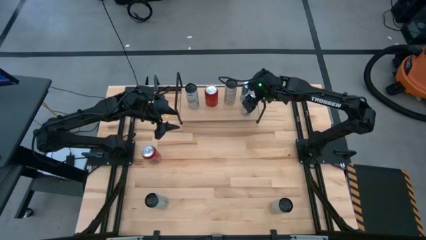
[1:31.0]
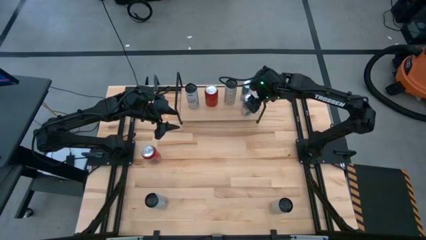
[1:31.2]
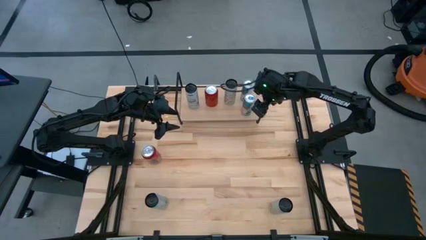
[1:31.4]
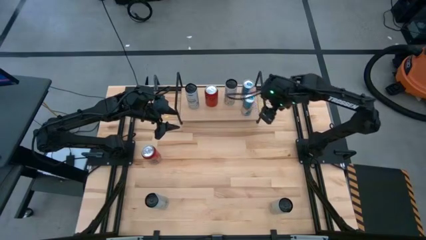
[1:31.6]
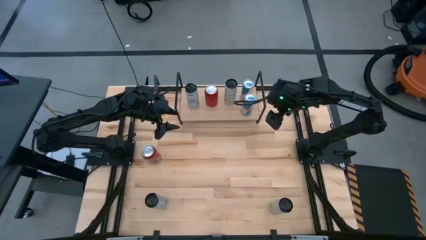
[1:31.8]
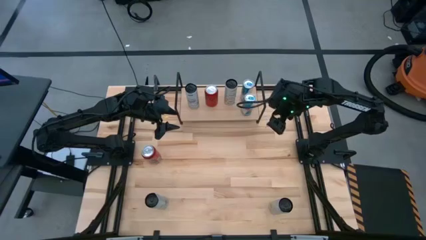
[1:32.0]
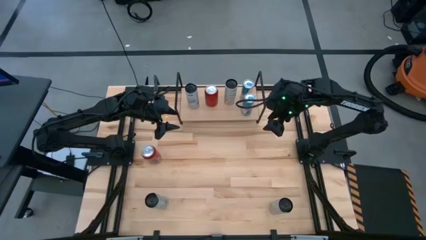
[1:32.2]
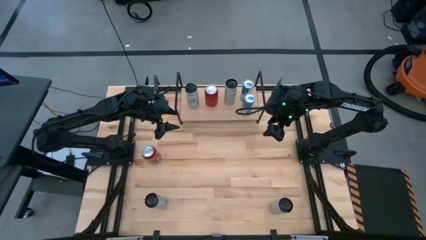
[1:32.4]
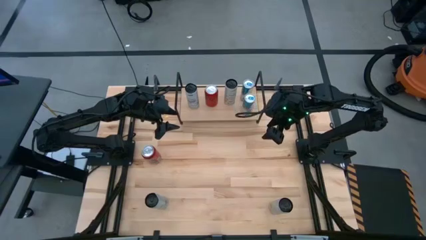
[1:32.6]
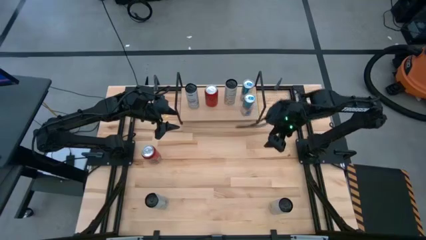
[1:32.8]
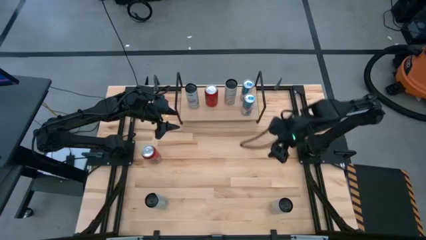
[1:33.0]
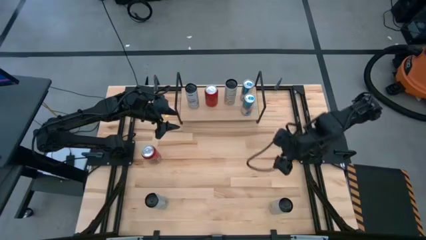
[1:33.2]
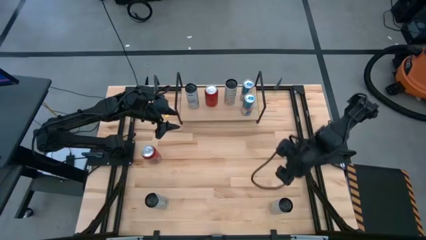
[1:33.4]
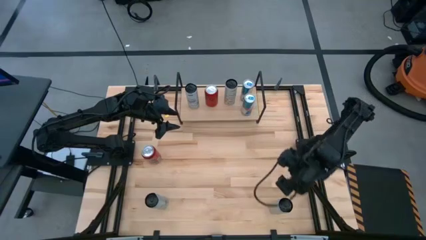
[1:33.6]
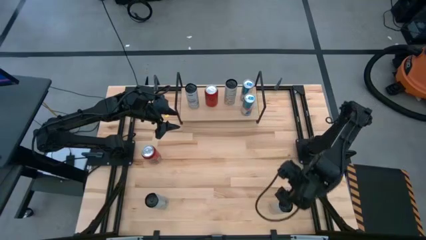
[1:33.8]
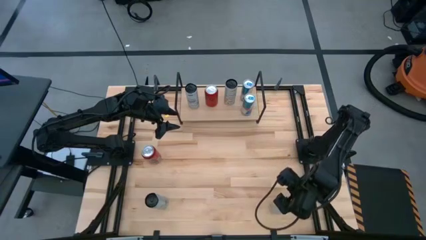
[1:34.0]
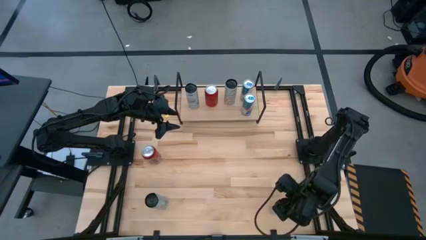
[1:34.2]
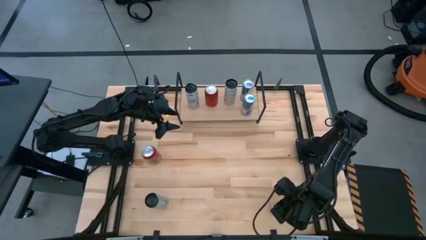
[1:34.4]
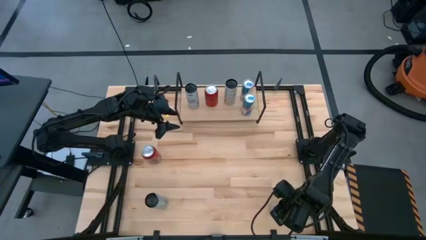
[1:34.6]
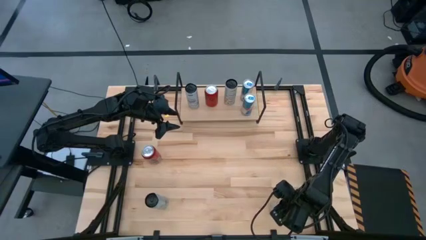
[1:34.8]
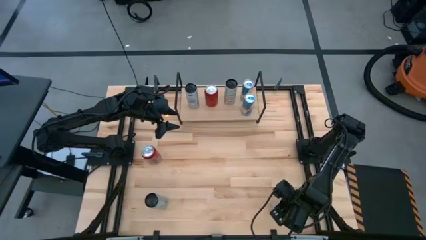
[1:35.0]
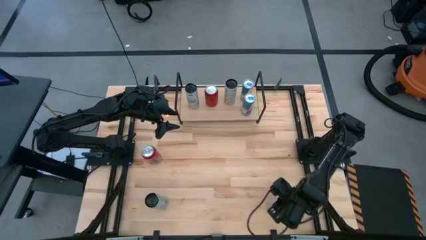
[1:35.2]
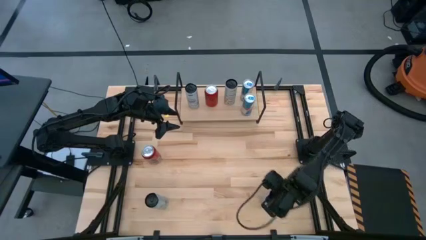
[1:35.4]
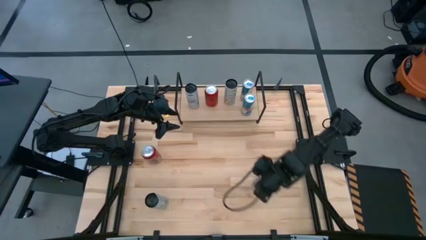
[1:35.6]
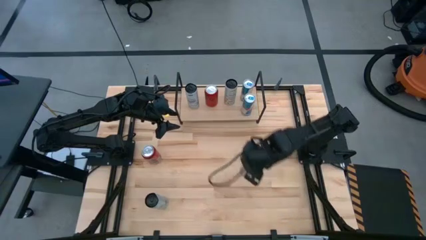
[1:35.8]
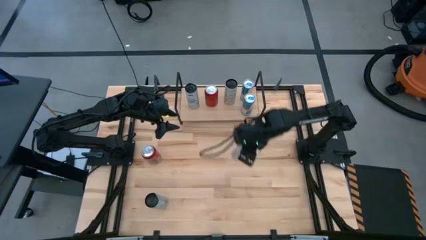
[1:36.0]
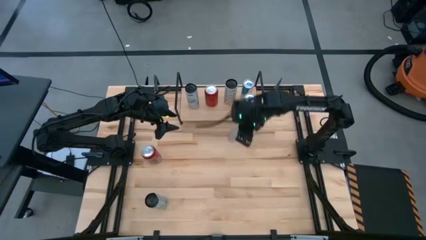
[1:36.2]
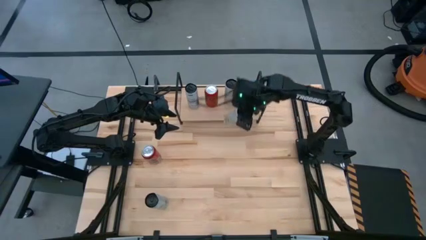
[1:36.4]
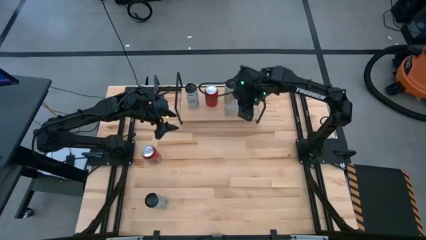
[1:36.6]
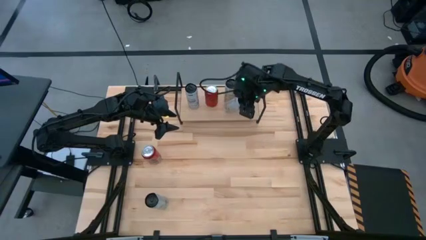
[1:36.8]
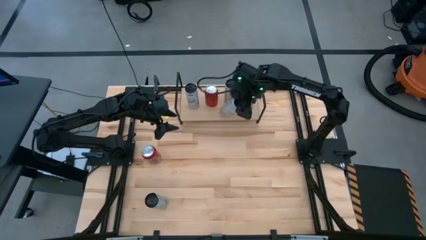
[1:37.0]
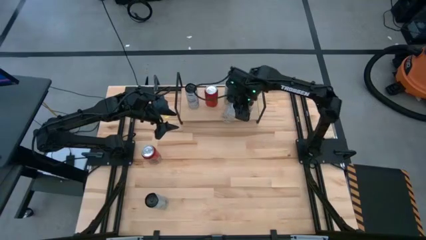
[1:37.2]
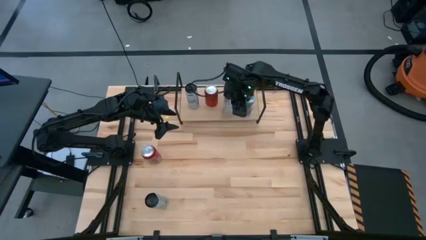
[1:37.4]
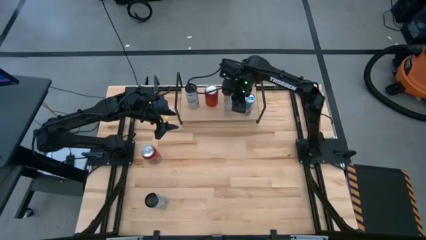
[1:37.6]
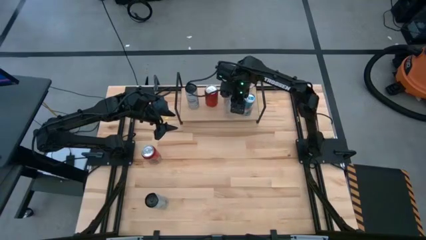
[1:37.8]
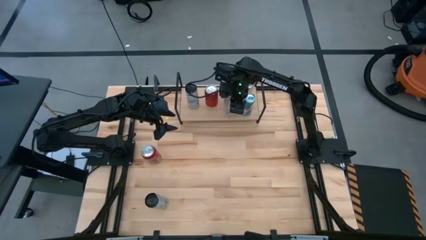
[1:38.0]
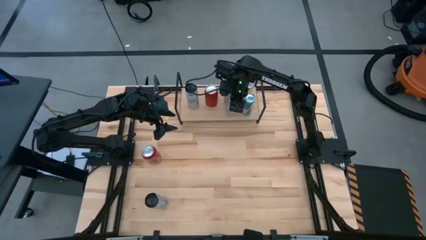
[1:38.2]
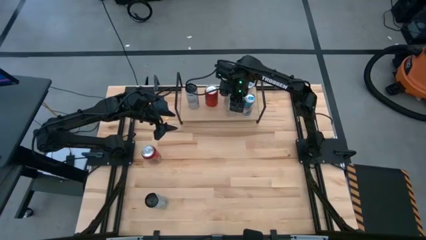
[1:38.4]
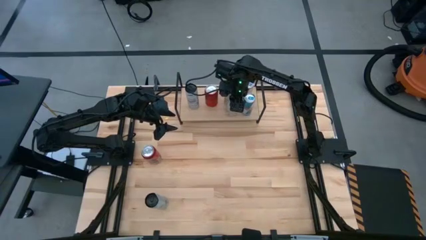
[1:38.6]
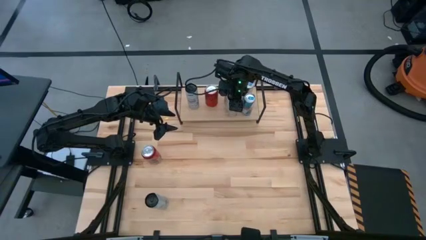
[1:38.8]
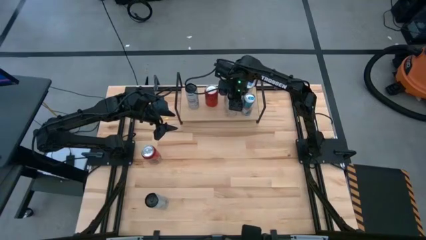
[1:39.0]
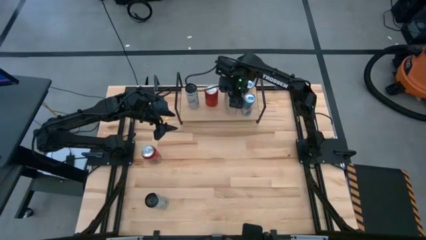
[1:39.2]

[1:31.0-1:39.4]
Task: Place canned beverage on shelf
Put the white-yellow soda can aligned with the other white-yellow soda can on the shelf

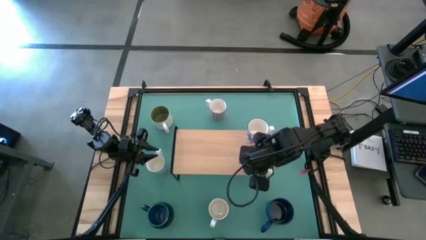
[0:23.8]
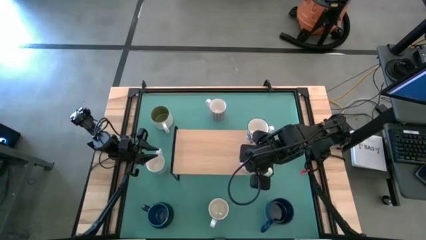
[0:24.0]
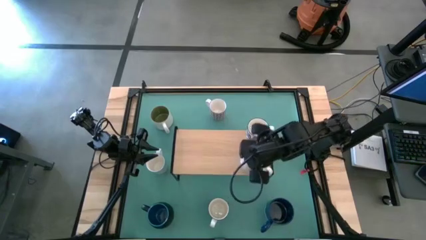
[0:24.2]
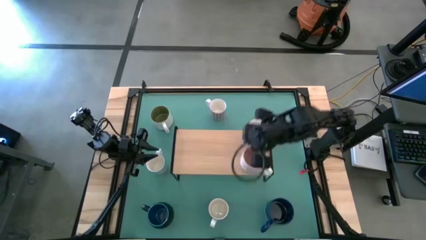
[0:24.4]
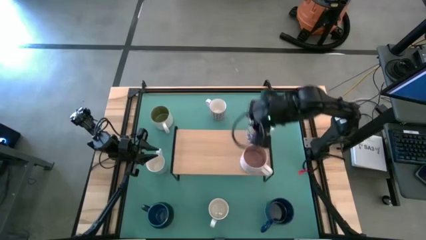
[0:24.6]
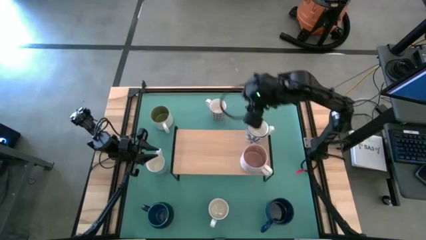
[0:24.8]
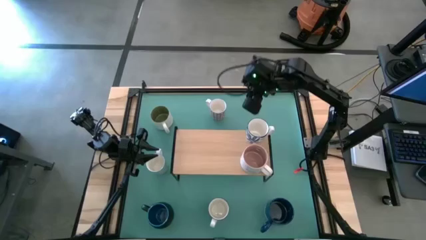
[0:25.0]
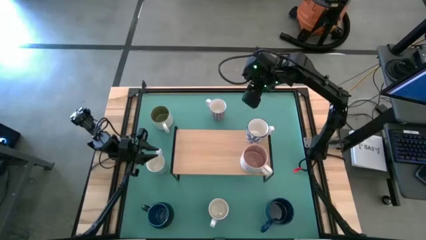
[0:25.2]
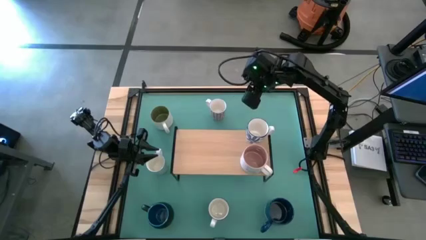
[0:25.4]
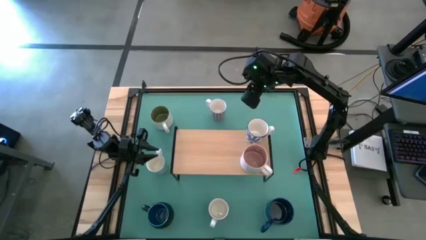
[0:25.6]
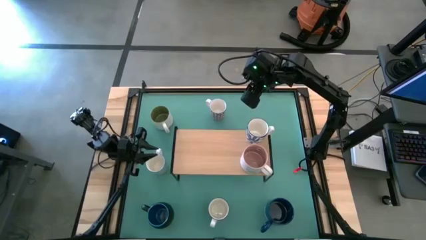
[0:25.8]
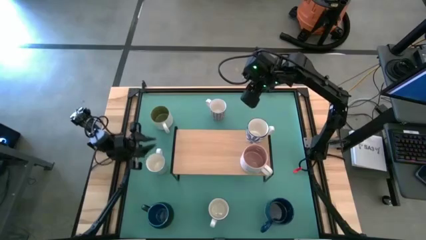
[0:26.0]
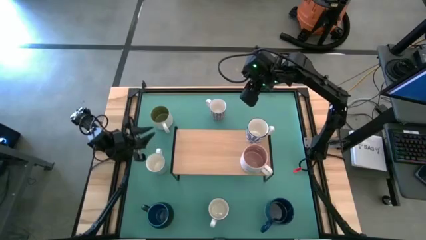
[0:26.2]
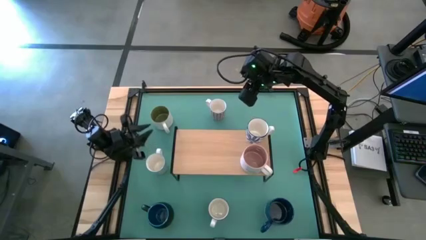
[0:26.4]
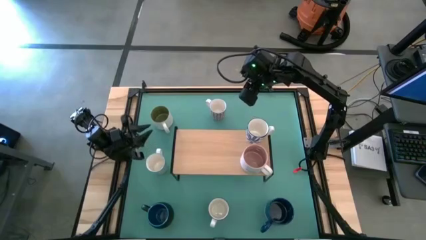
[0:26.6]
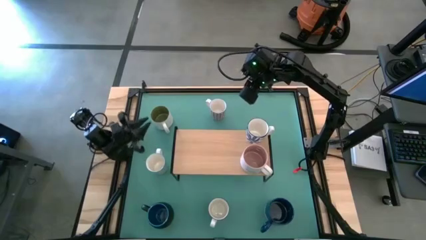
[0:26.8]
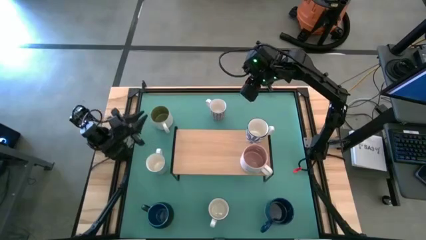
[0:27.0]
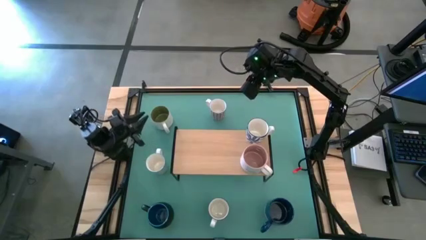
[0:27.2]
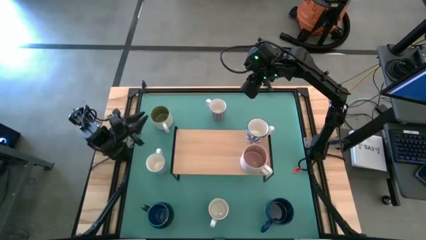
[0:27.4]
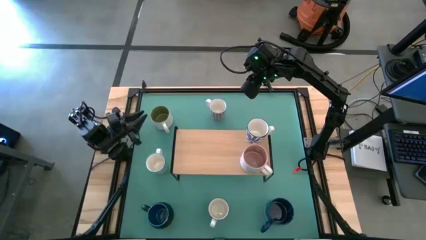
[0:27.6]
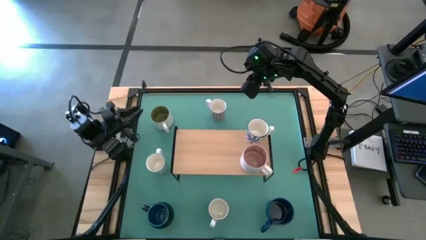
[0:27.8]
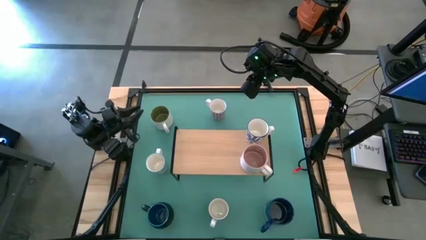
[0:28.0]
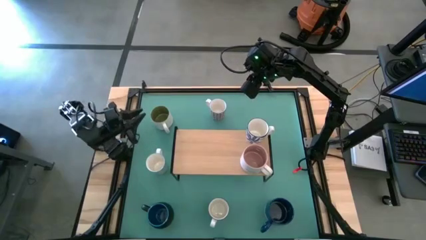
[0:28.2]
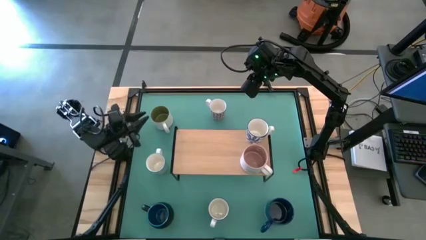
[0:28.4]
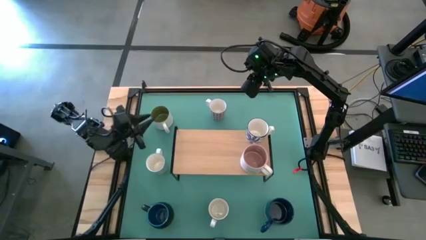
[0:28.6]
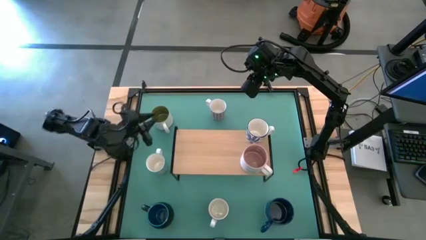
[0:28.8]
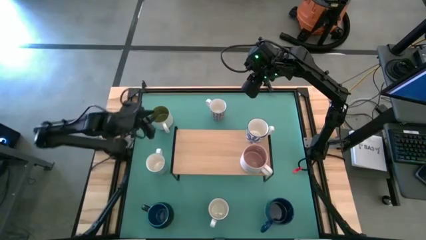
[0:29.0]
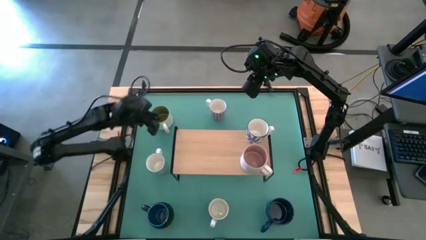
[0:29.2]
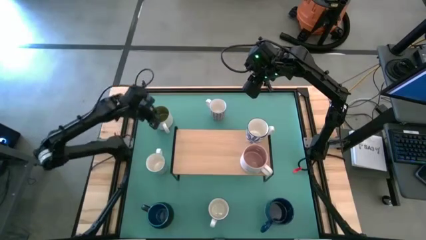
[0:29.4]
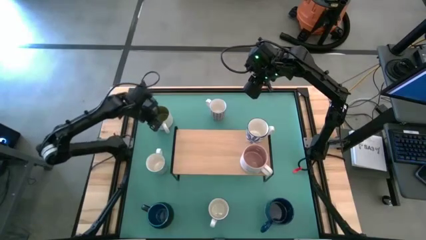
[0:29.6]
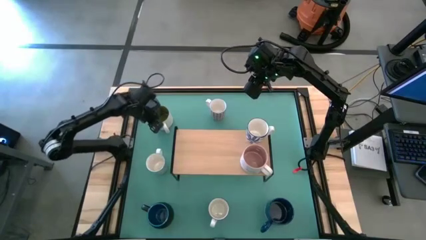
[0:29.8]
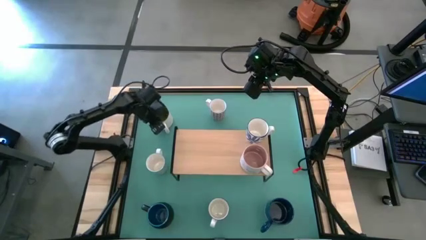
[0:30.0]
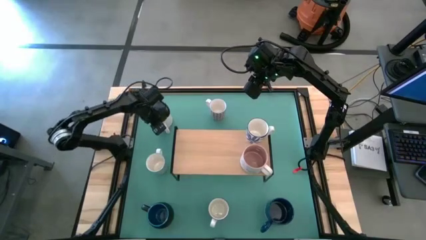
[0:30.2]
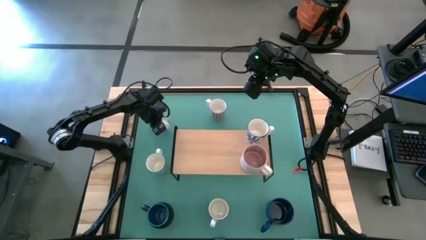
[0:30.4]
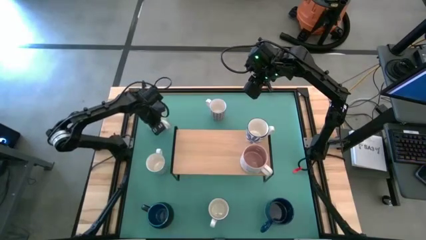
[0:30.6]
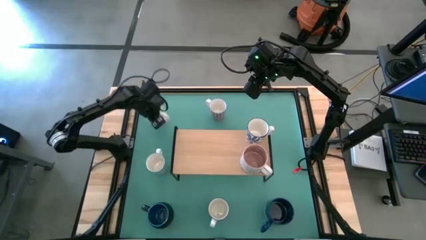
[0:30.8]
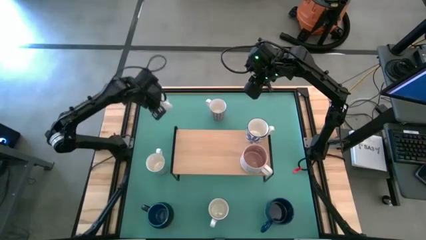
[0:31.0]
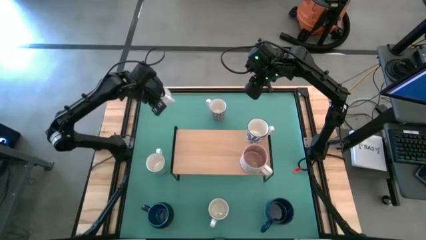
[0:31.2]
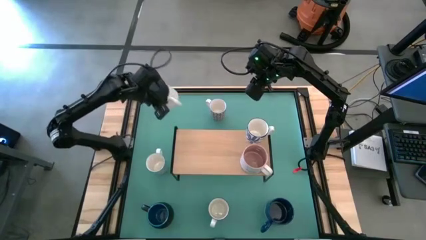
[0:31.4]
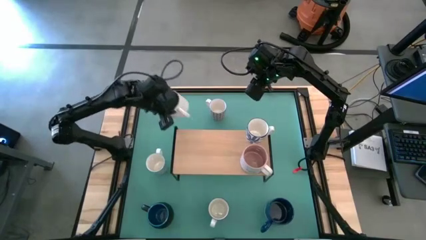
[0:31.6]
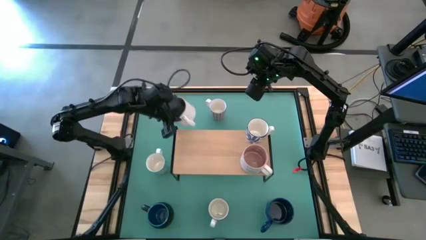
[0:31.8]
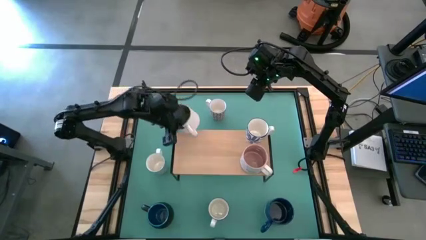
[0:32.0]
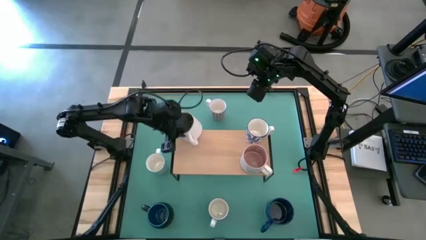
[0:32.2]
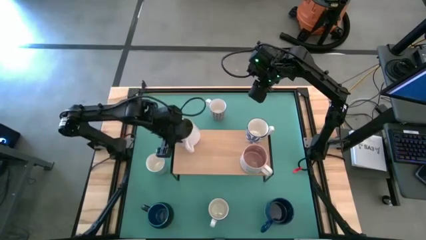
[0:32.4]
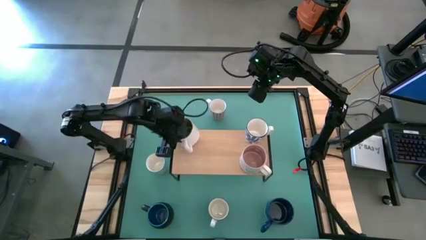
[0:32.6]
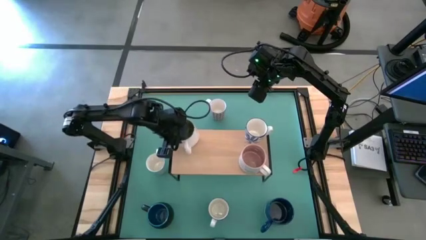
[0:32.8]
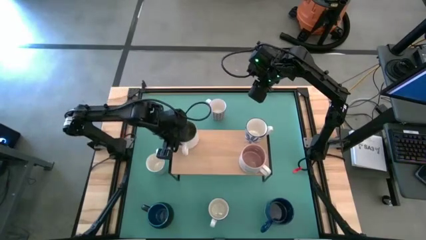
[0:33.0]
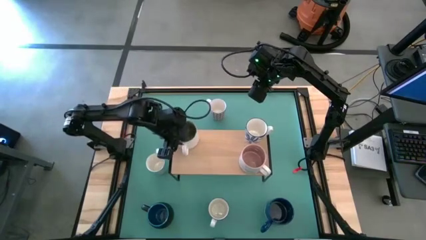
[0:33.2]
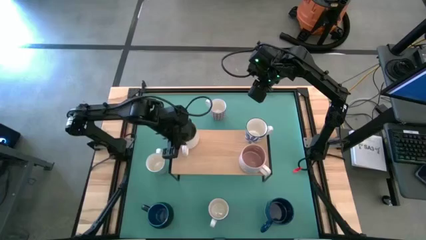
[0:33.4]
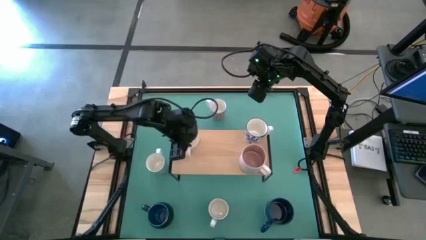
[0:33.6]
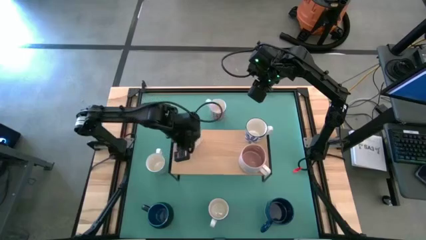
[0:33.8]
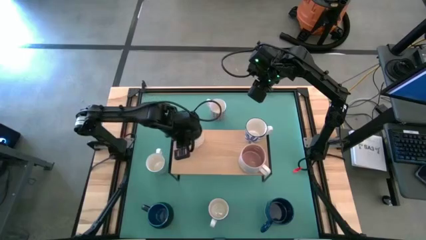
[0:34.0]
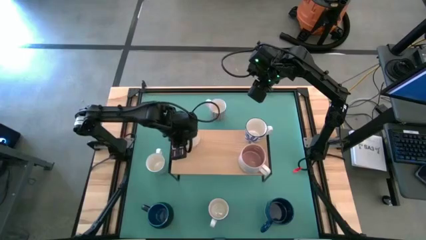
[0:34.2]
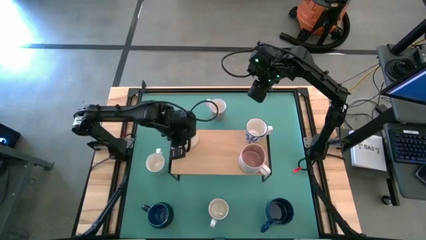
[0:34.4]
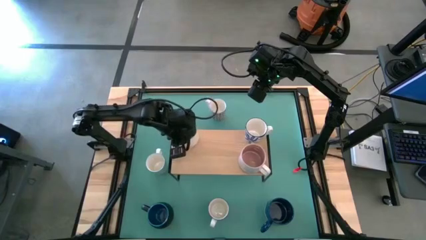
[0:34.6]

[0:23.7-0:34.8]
Task: Place coffee mugs
Put the white brown mug on the shelf
